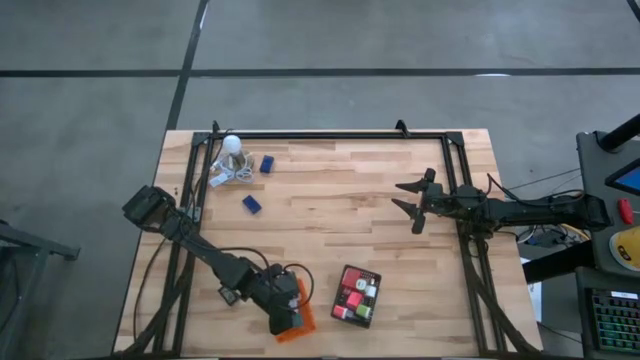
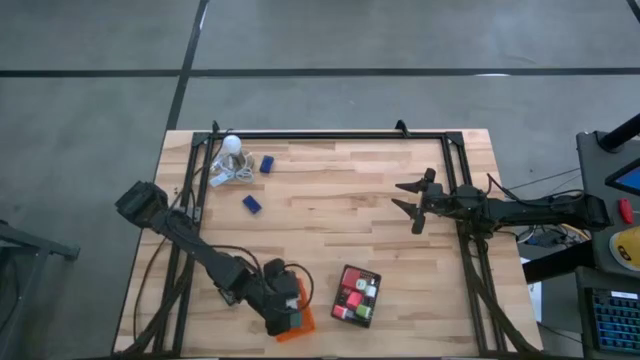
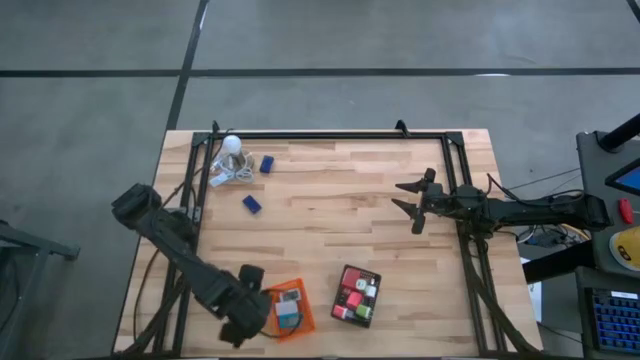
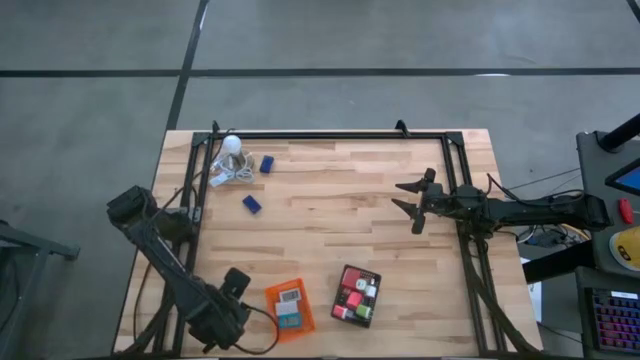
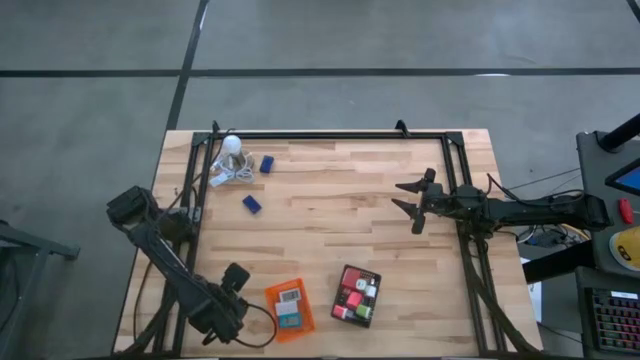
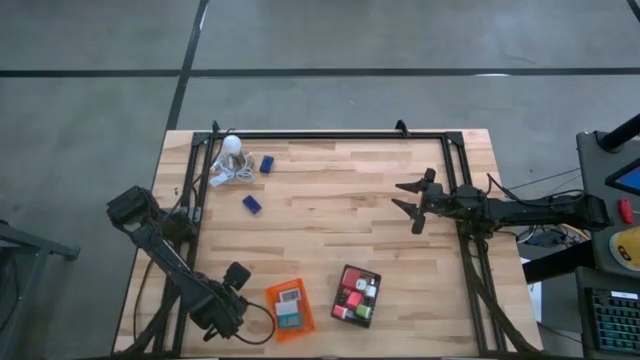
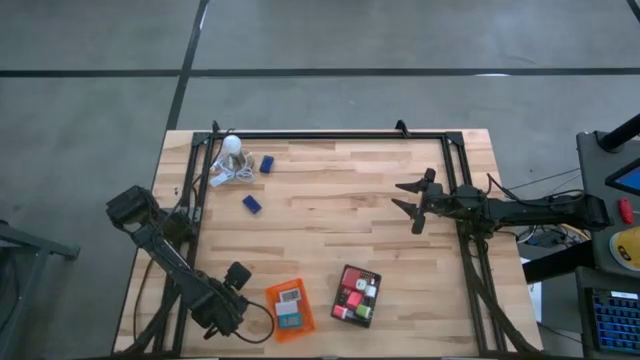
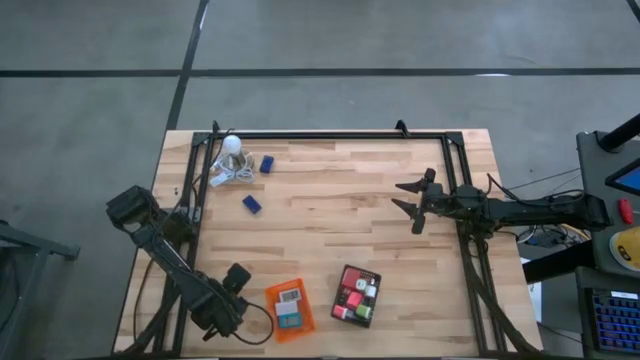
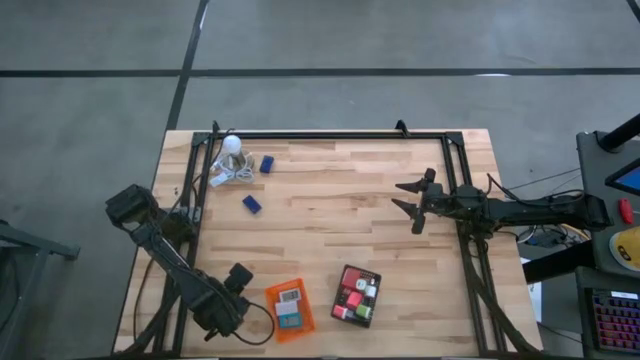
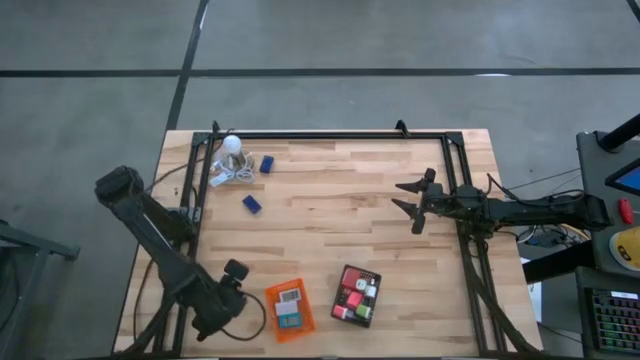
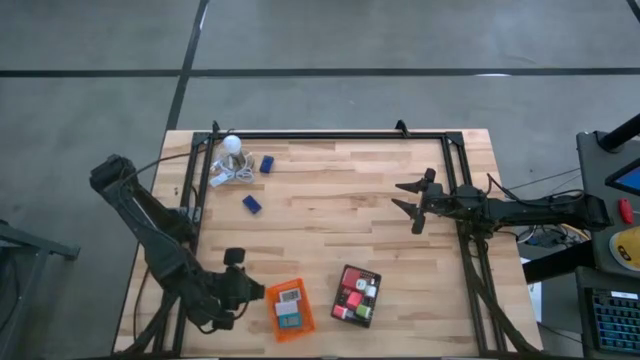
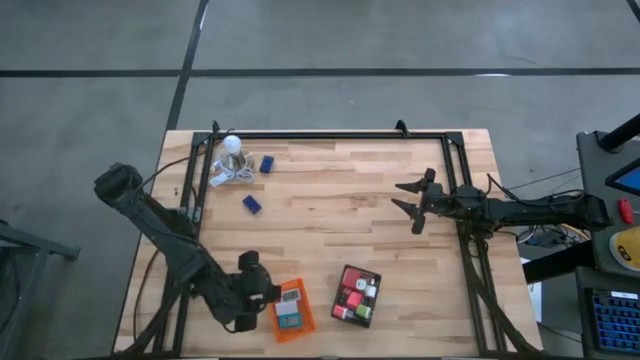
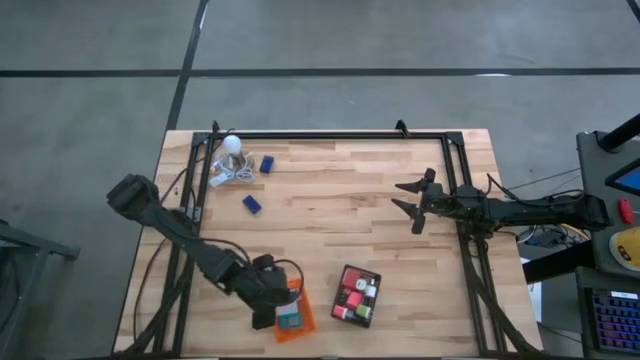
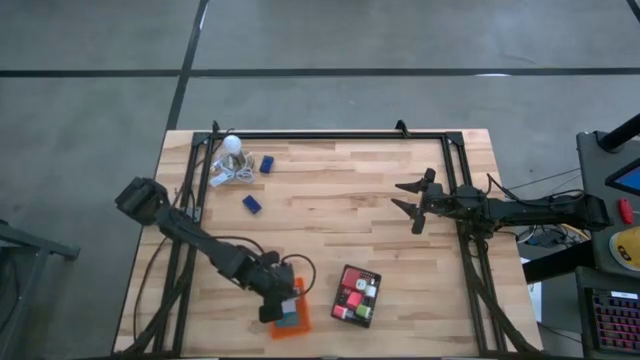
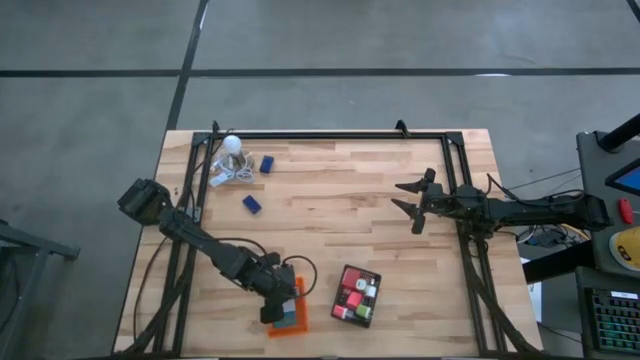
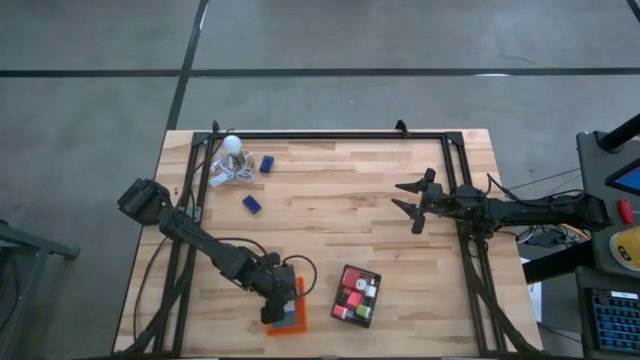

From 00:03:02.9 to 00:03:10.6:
Task: Pick & Place Office items
Put the black timer into the orange bin

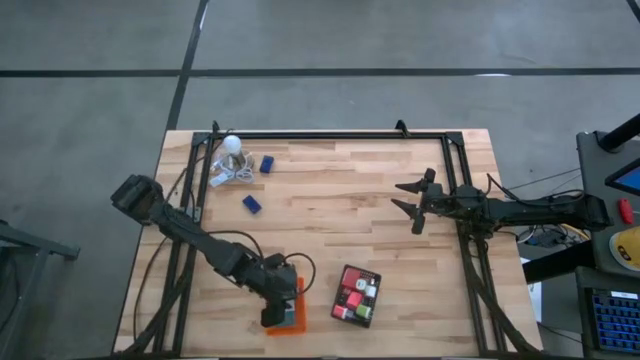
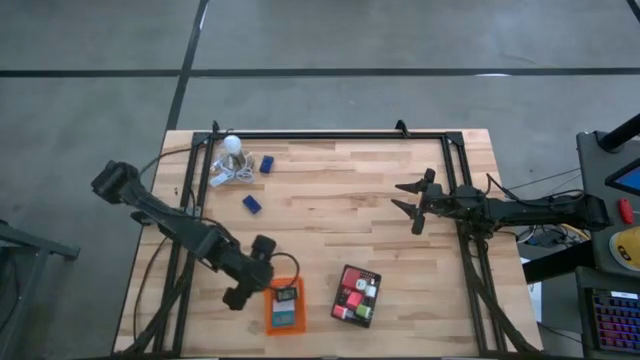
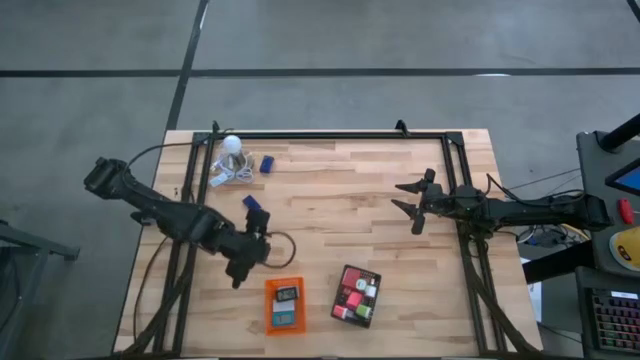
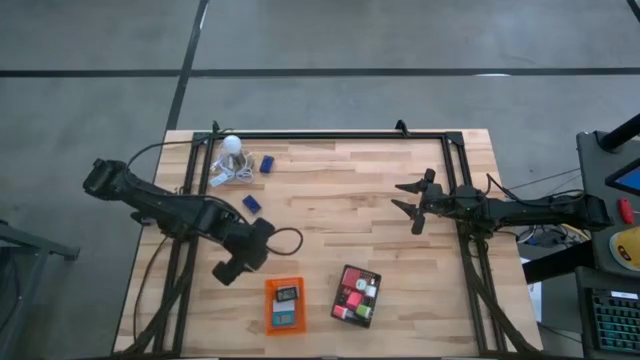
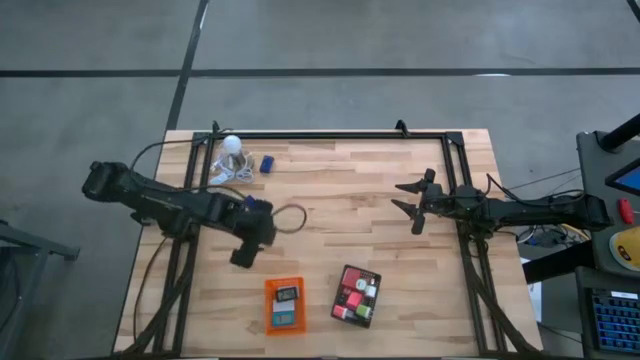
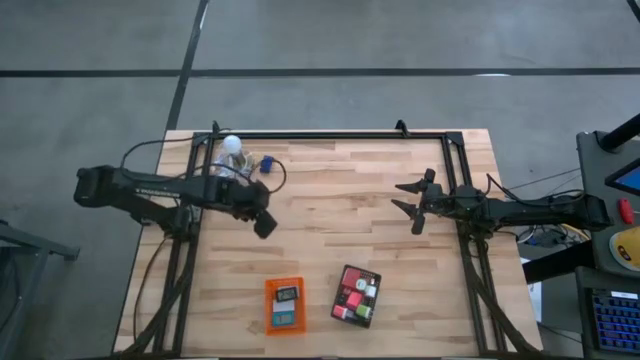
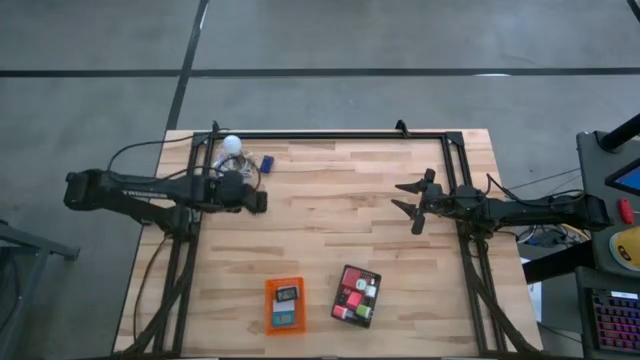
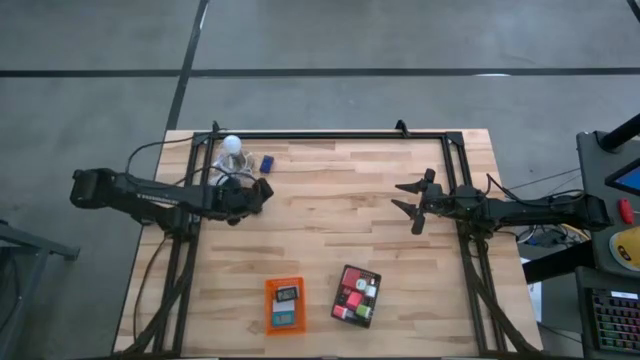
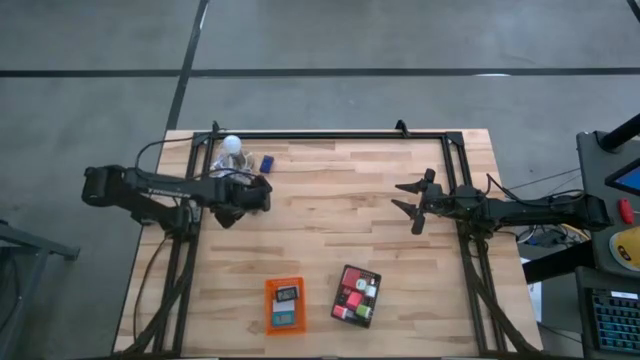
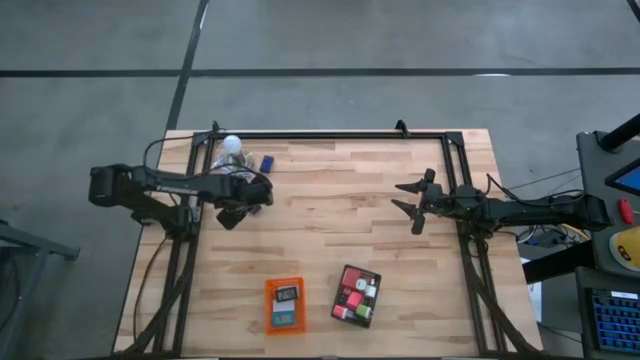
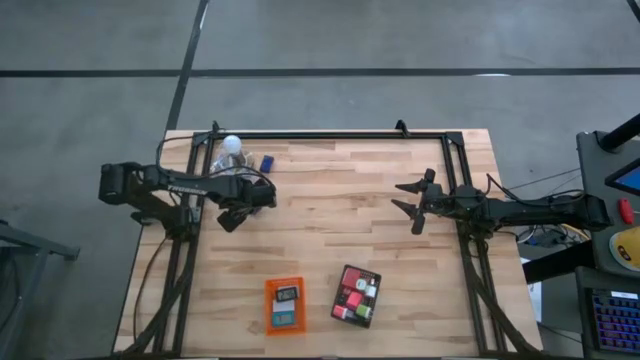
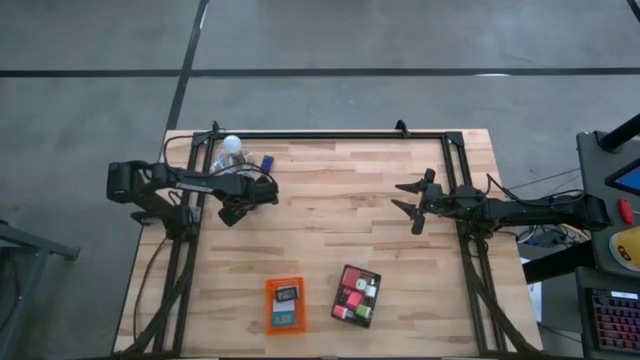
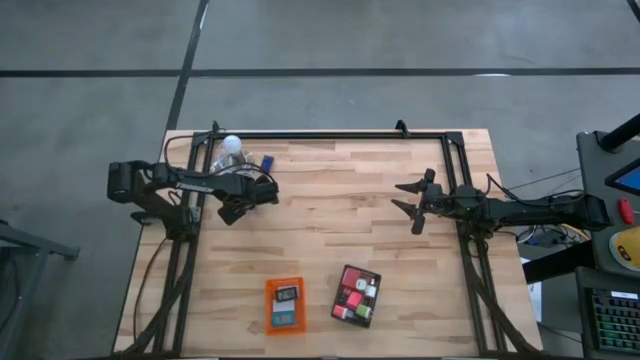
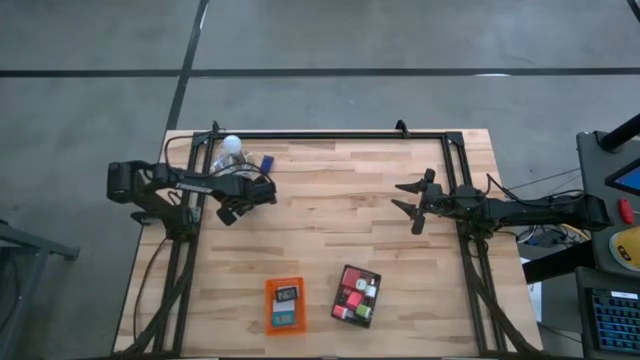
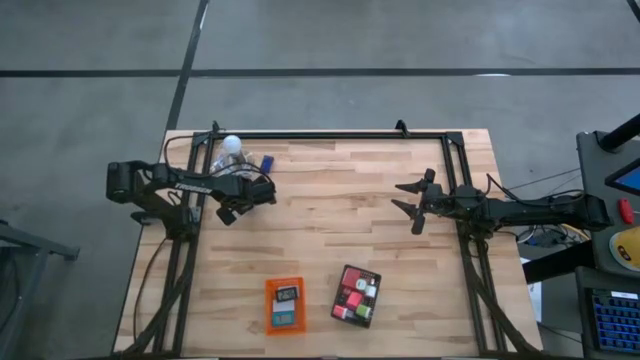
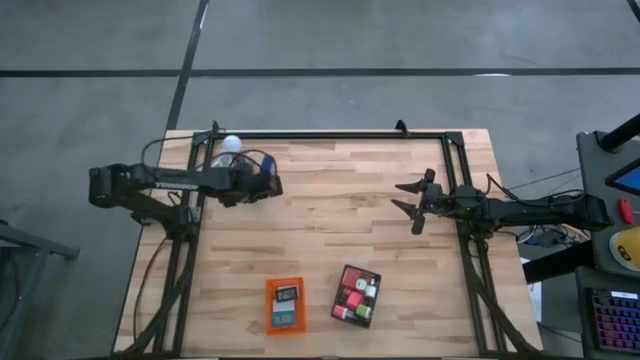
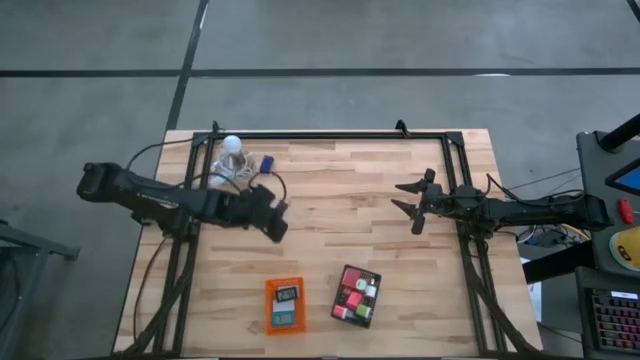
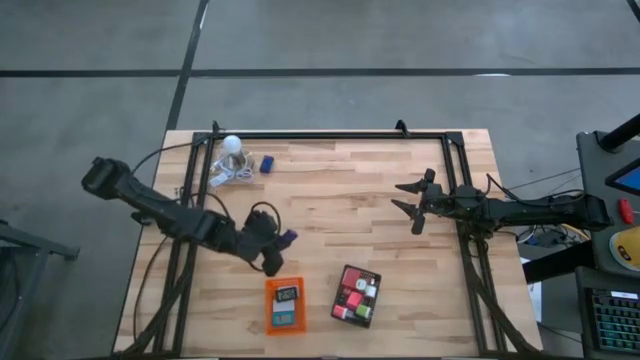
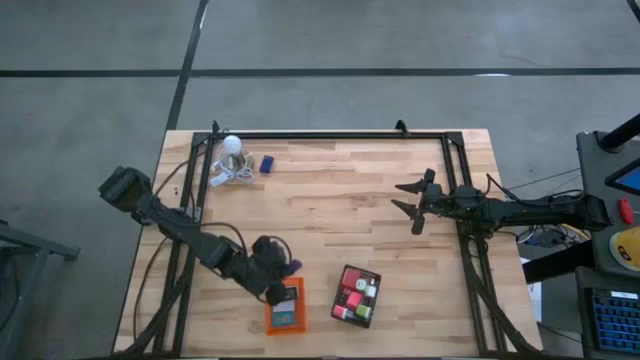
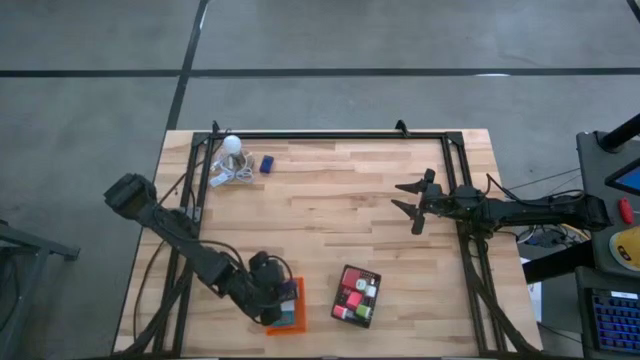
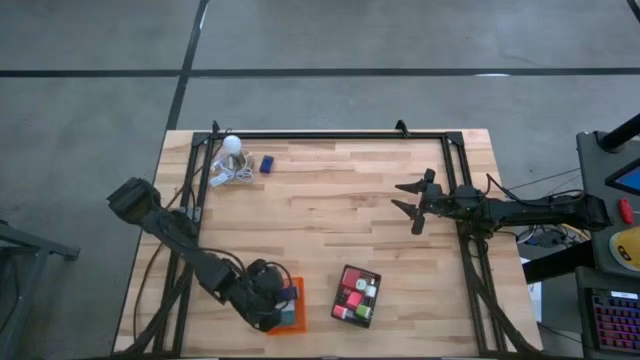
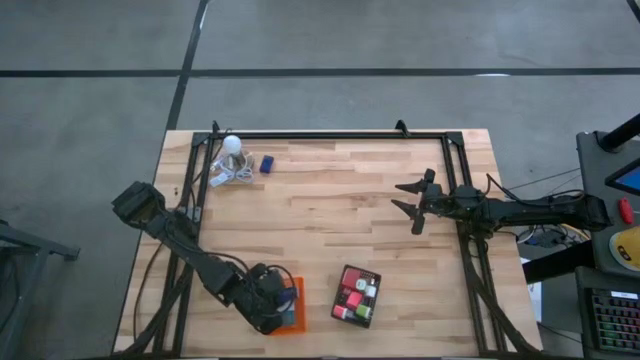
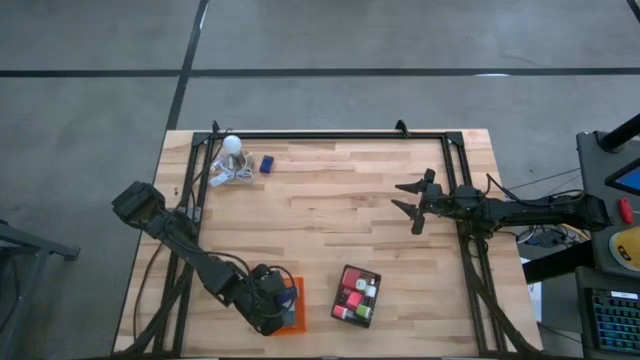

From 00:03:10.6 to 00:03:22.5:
Put the bottom dark blue timer into the orange bin
